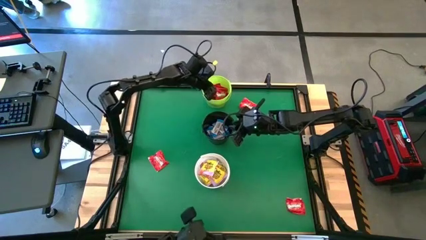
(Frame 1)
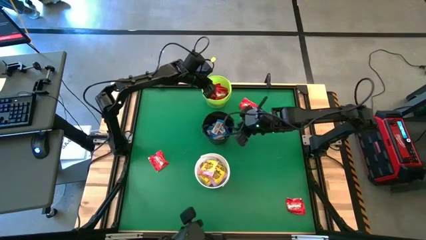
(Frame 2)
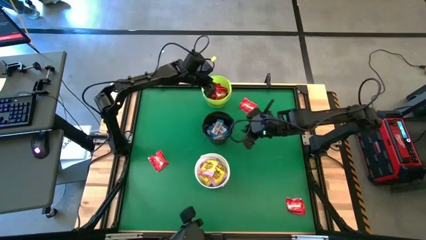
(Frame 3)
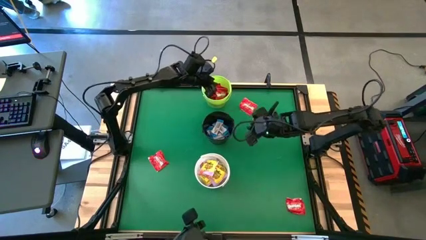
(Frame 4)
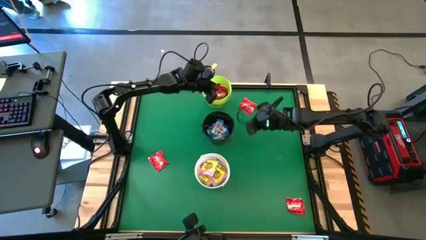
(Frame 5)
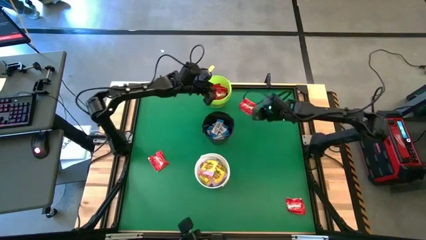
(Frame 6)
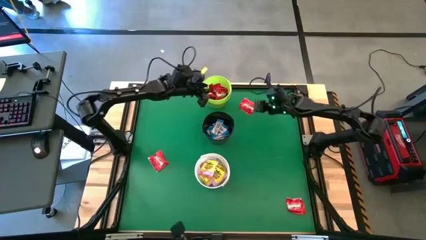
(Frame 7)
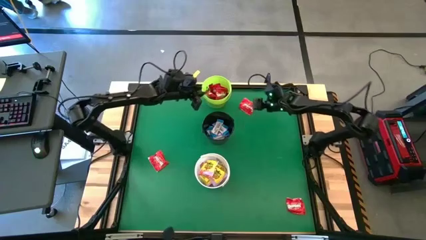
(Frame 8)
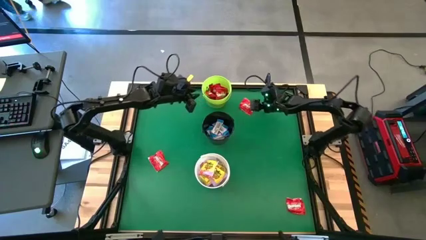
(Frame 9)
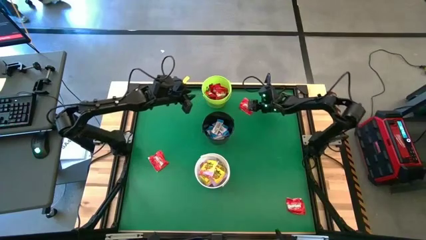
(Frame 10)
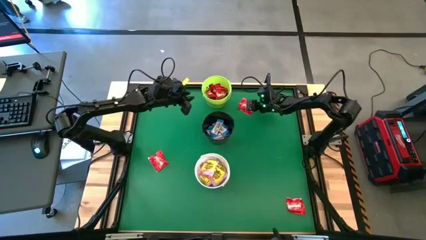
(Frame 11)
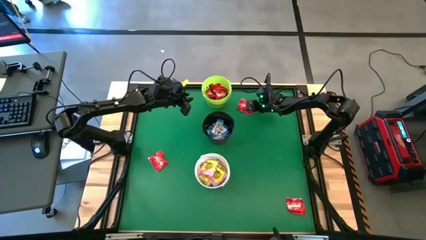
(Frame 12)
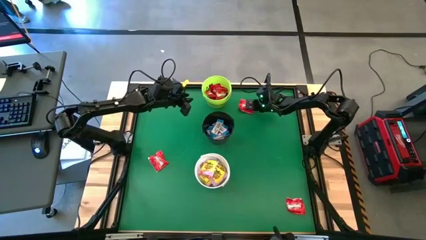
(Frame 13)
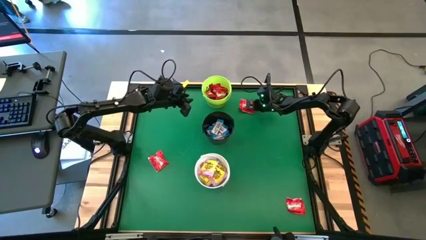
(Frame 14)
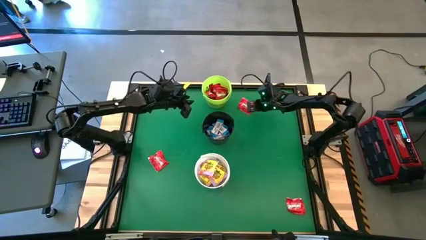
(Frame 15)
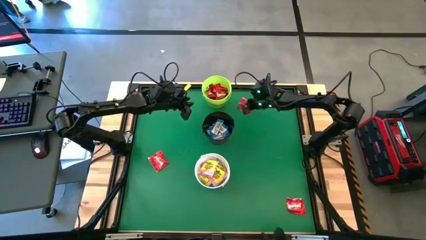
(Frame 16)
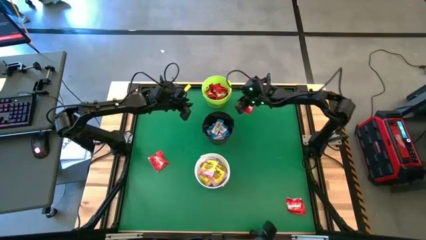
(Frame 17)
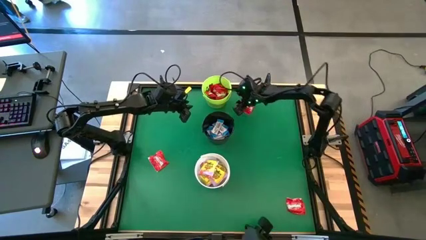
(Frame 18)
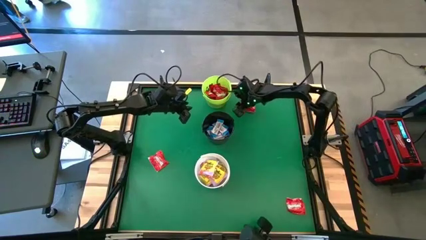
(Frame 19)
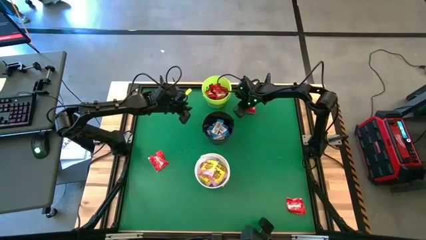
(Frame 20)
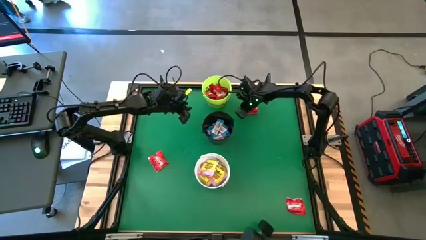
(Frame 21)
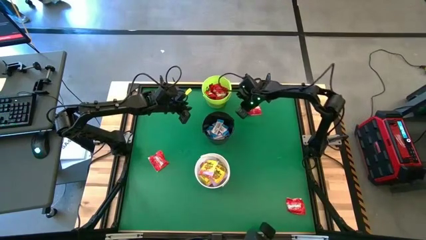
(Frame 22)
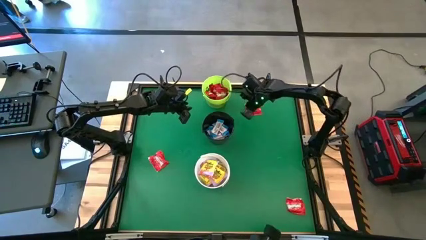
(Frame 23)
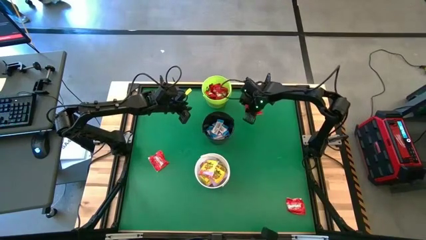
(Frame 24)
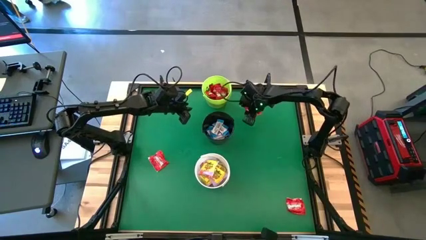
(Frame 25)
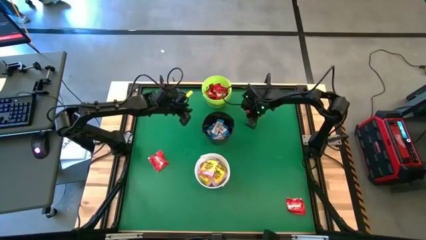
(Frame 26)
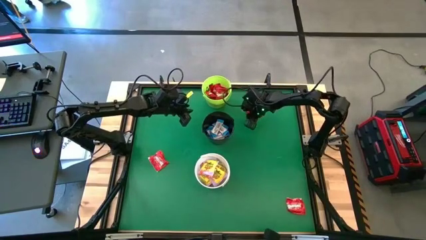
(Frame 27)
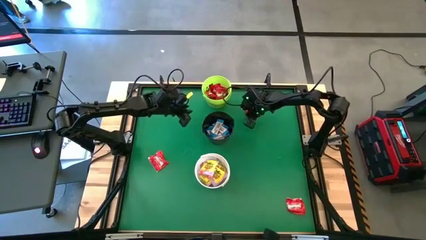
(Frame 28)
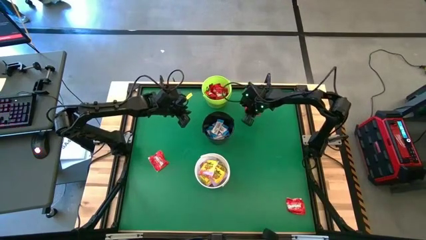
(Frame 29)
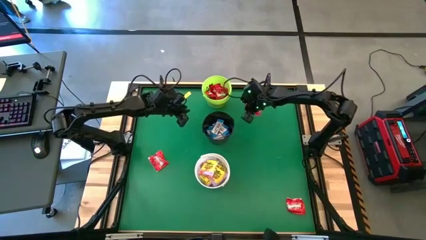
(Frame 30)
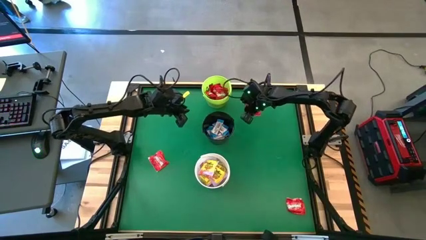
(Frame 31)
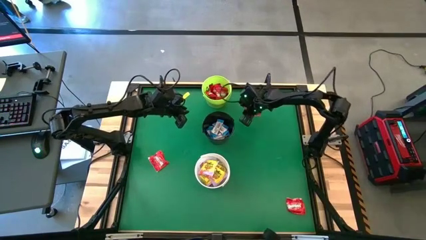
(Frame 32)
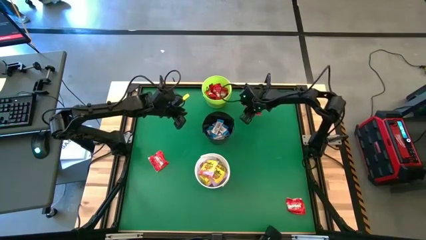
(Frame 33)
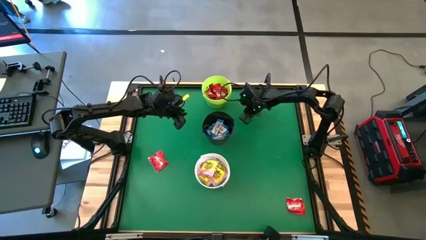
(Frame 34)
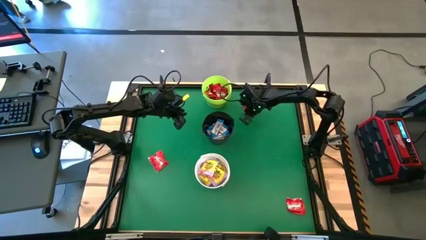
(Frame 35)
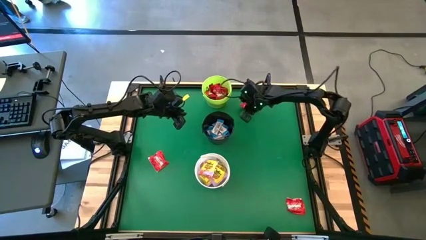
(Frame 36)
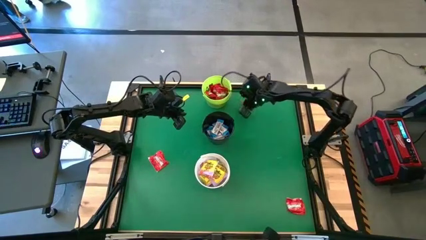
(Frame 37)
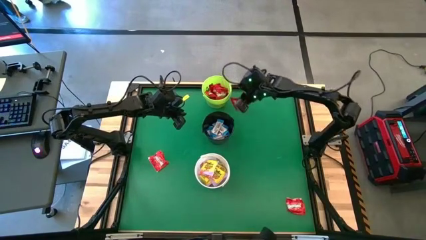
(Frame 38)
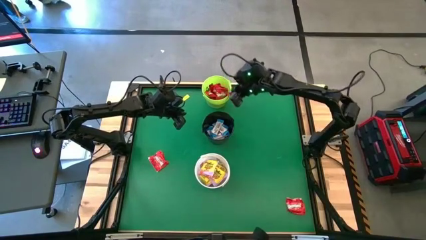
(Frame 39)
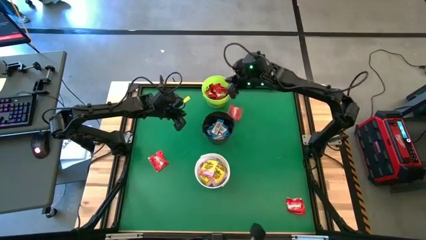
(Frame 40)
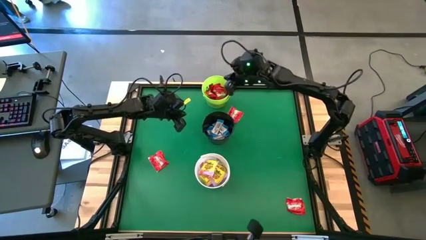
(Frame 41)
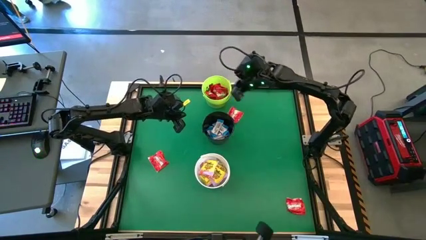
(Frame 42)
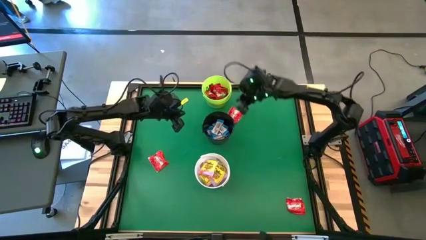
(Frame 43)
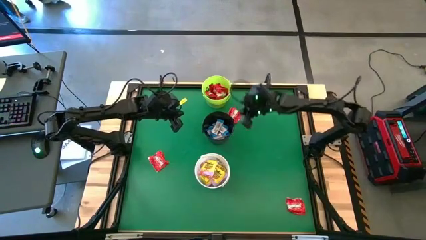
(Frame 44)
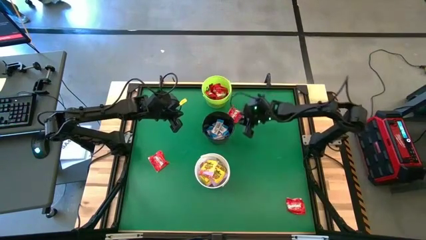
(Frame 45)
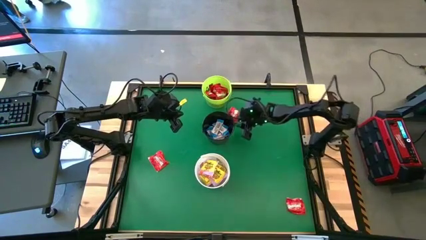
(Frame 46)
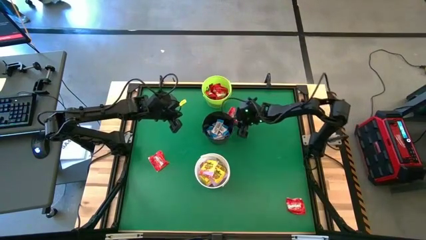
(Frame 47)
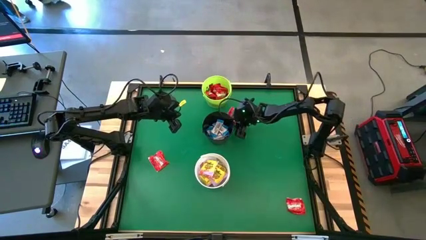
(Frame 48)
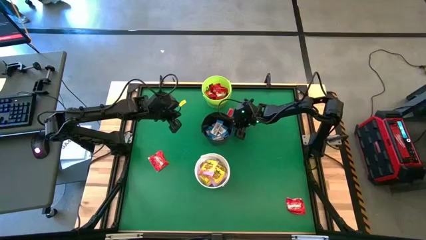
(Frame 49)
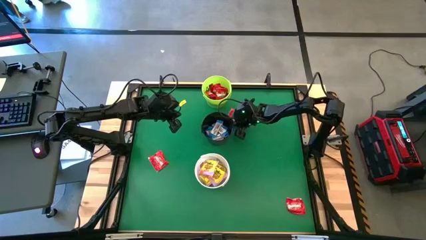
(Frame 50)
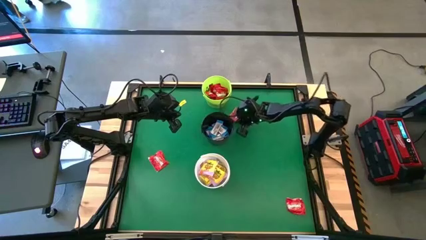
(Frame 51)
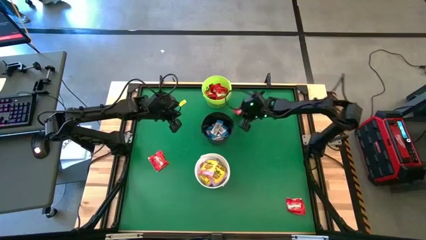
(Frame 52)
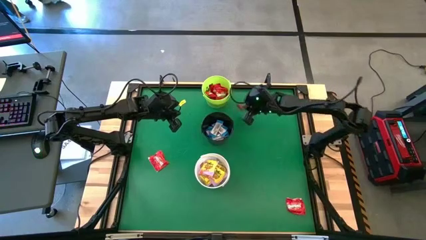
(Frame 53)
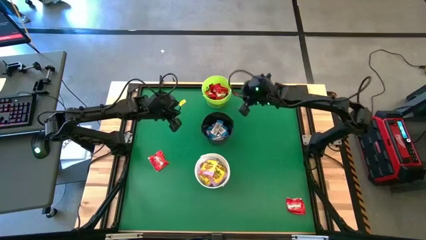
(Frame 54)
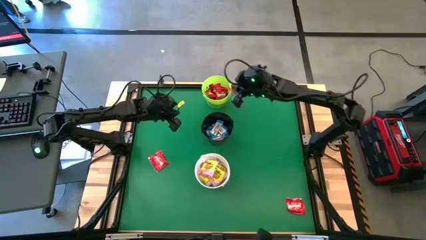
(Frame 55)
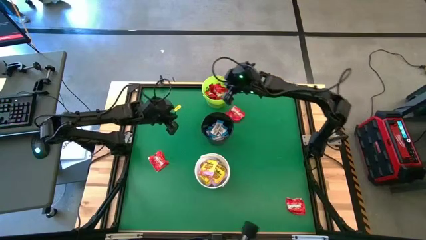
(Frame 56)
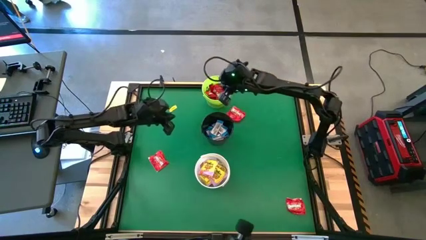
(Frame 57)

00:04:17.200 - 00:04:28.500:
Task: Sort candy by brand, put in halloween buckets
Put the red candy into the green bucket

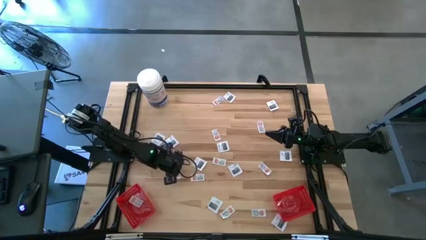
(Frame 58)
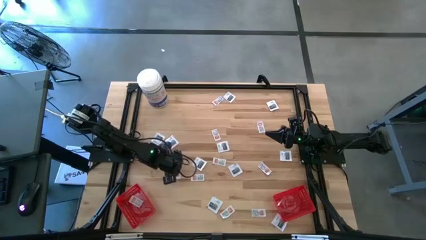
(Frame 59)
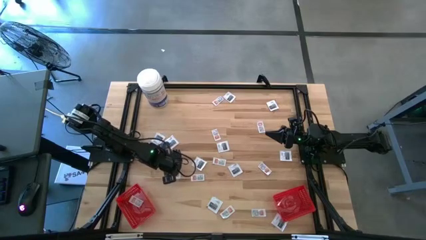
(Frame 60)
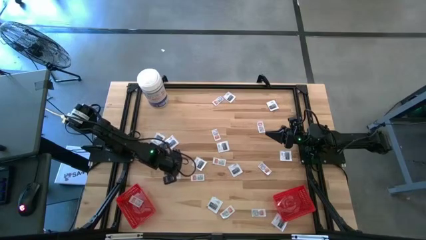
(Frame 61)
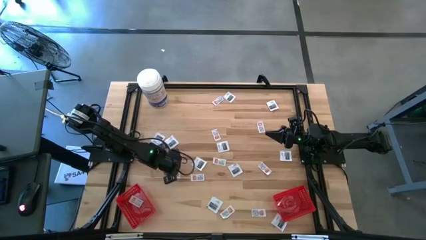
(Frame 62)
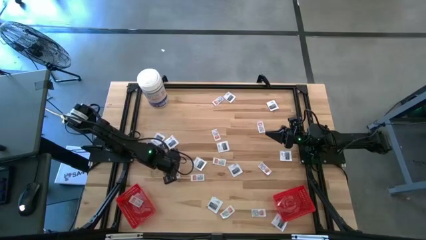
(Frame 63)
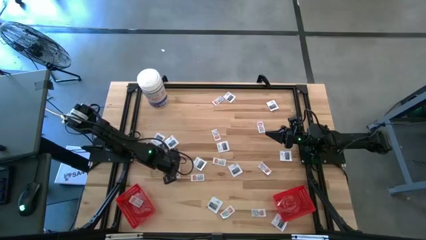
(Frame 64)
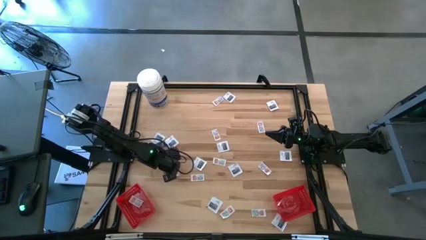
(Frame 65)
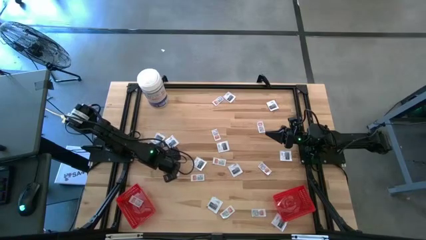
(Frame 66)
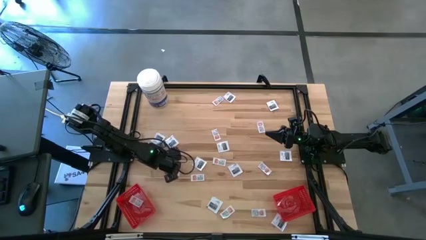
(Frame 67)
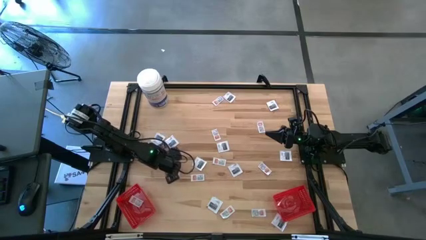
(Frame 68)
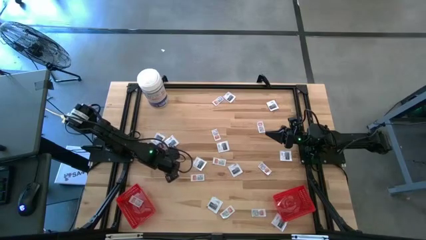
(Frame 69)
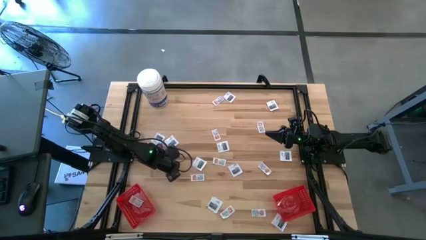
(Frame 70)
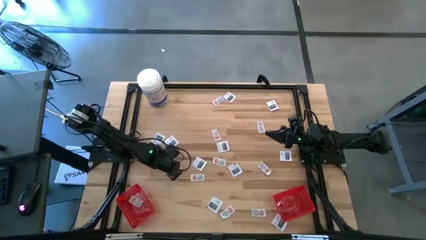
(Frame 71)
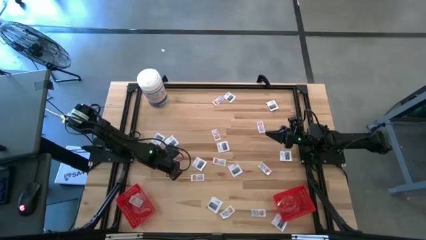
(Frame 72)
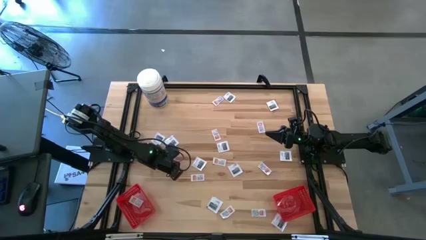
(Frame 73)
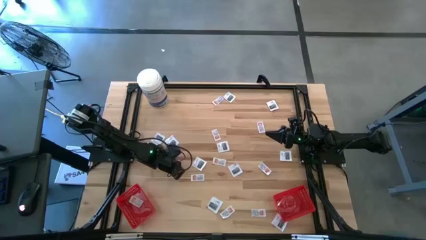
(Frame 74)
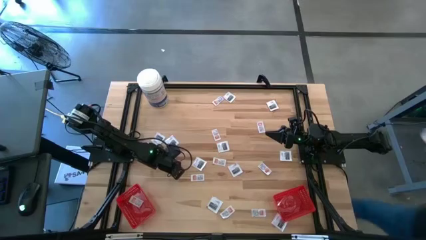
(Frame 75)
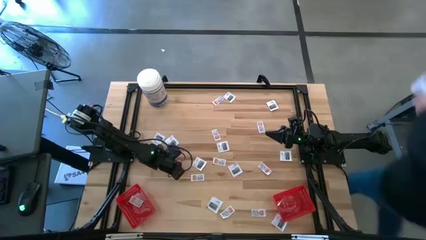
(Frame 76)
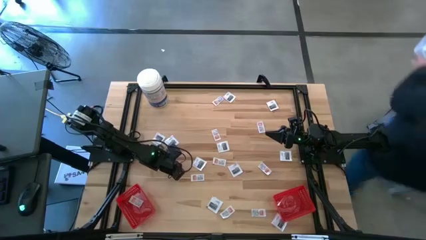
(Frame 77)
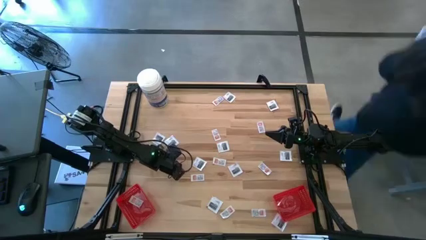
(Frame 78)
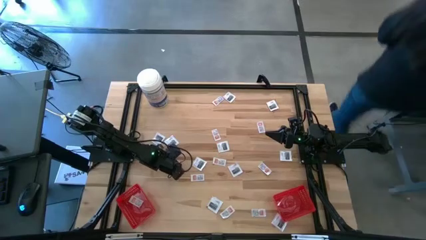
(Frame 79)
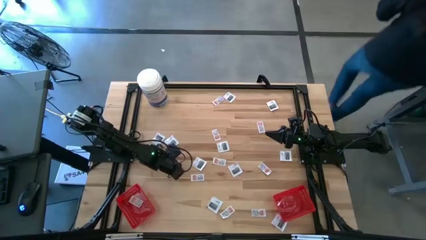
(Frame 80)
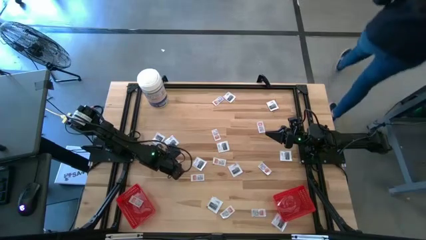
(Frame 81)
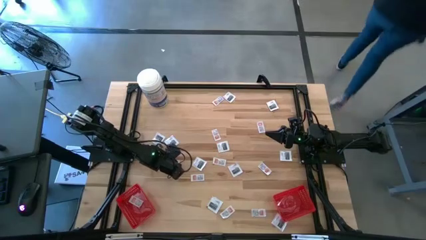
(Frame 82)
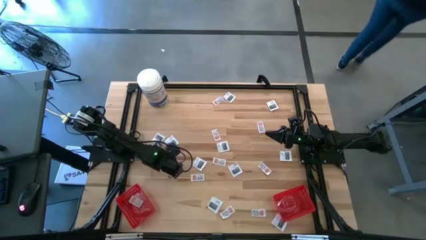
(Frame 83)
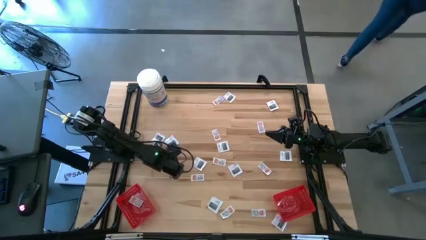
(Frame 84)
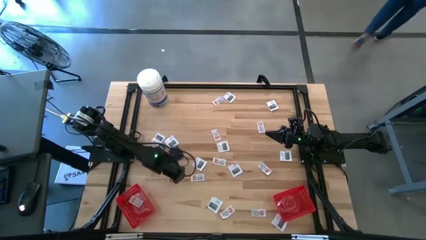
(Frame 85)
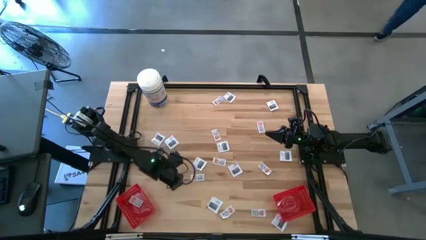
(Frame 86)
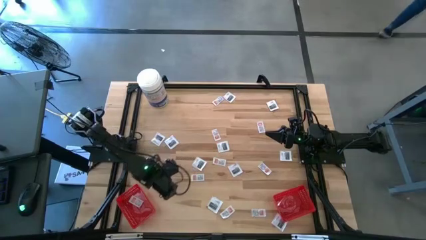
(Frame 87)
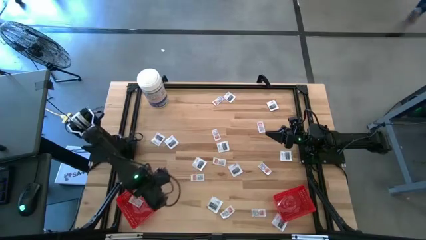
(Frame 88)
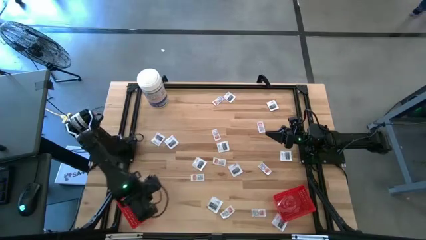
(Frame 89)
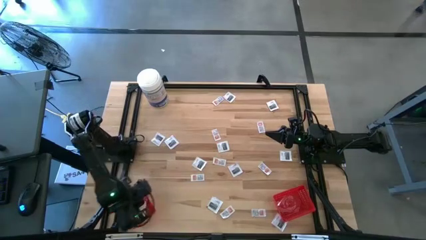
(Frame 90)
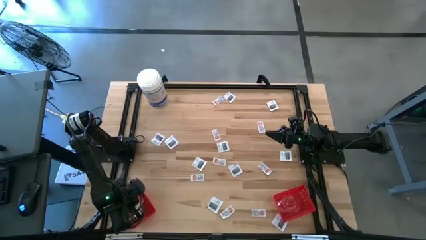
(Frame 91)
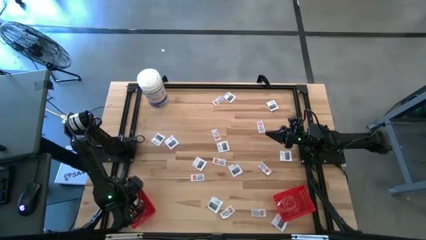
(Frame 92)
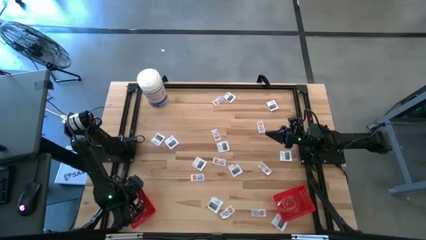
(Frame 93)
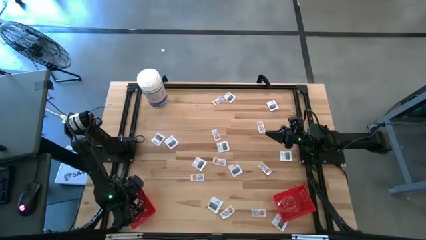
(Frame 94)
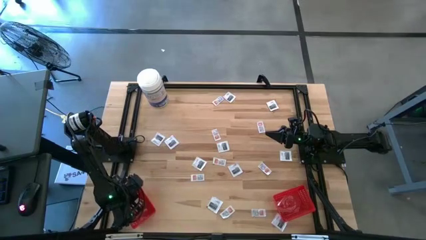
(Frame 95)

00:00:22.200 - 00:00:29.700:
Task: Pick & Place First Aid Supplies
Put the ointment pack into the left red bin
